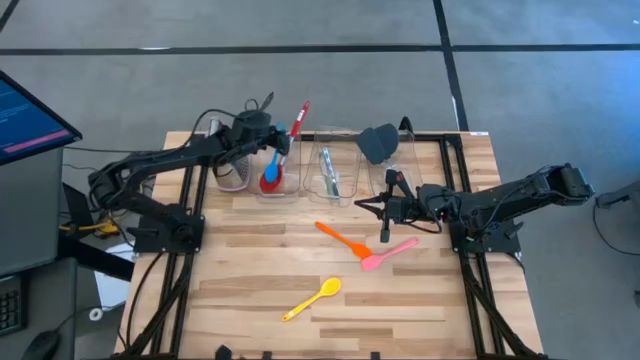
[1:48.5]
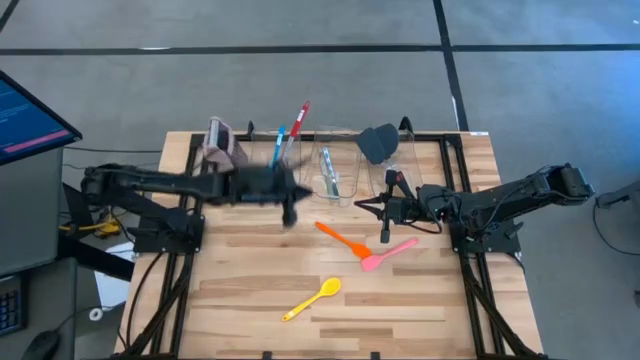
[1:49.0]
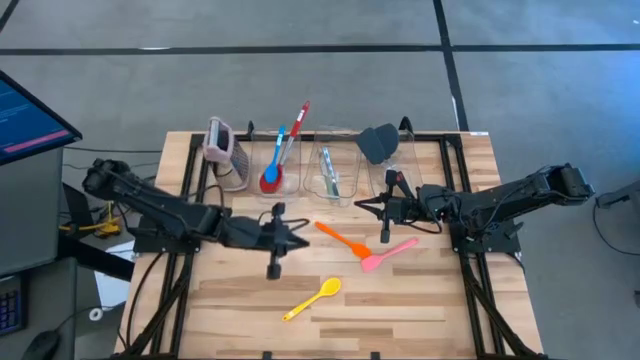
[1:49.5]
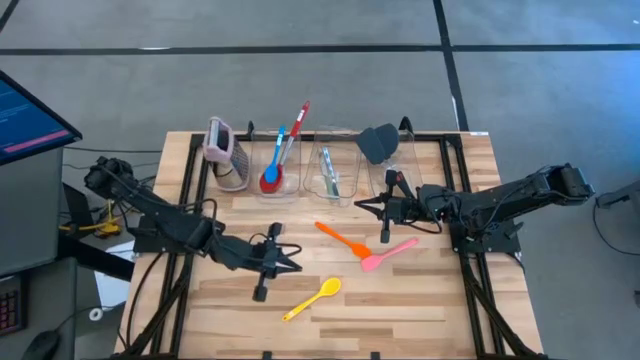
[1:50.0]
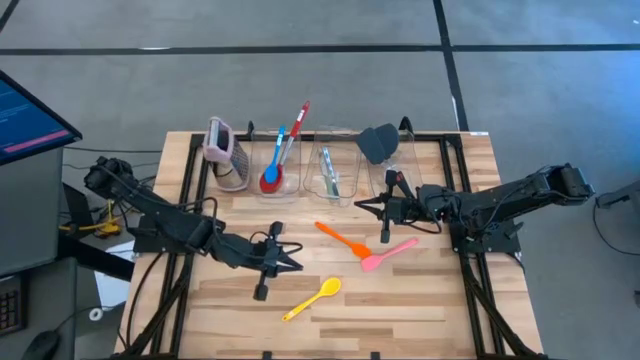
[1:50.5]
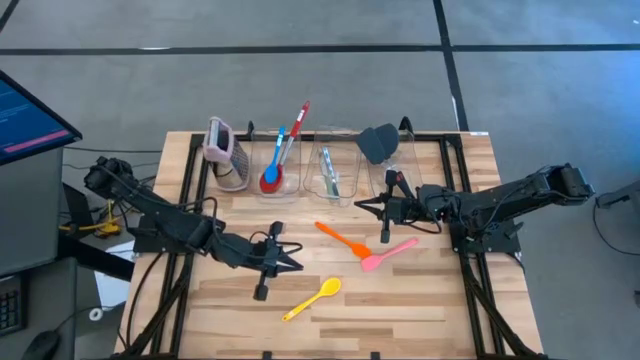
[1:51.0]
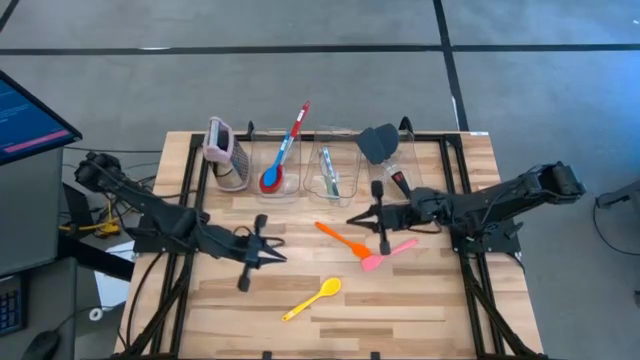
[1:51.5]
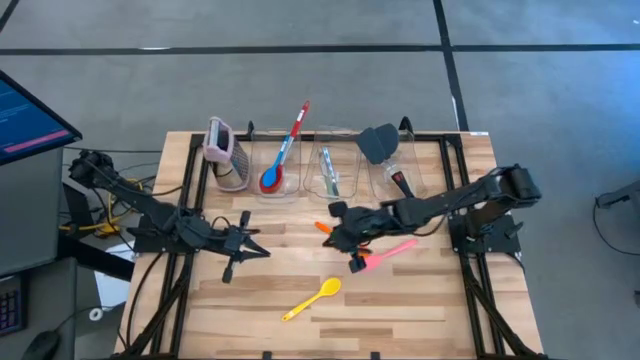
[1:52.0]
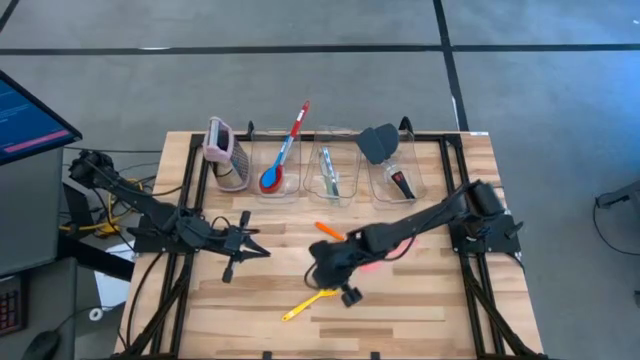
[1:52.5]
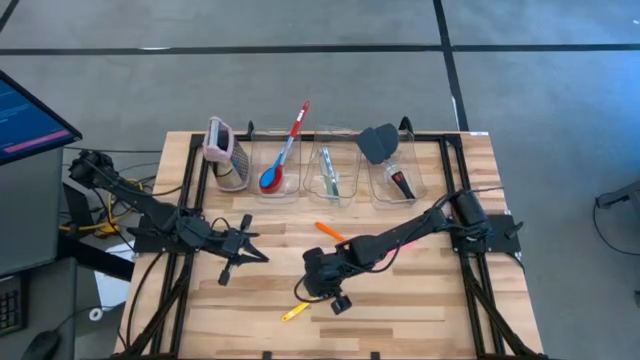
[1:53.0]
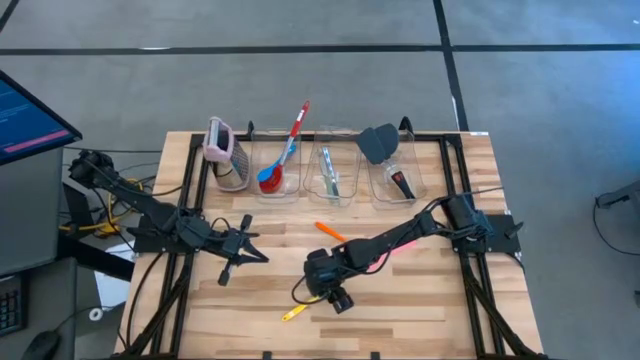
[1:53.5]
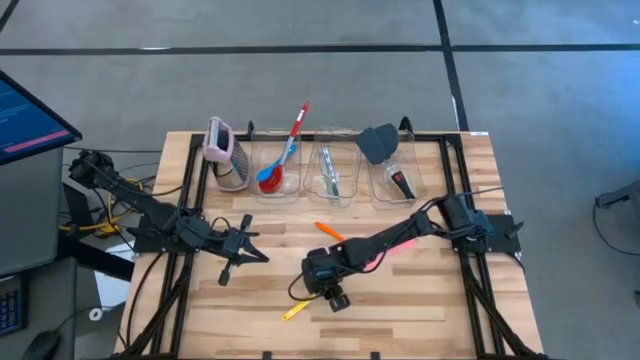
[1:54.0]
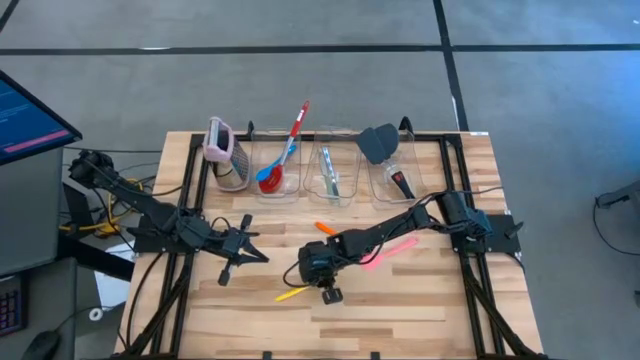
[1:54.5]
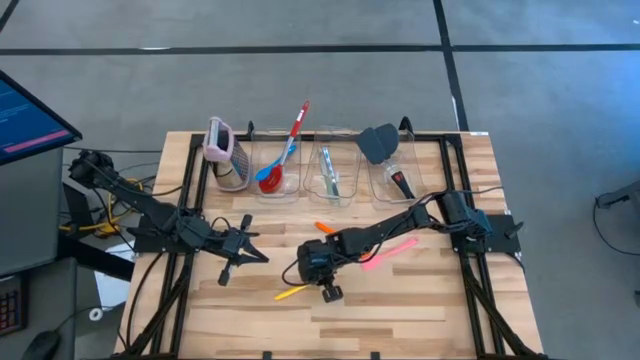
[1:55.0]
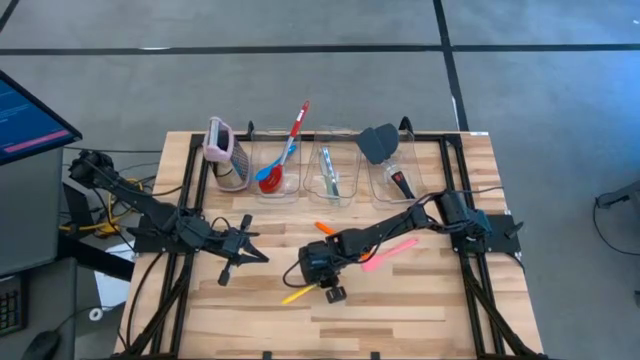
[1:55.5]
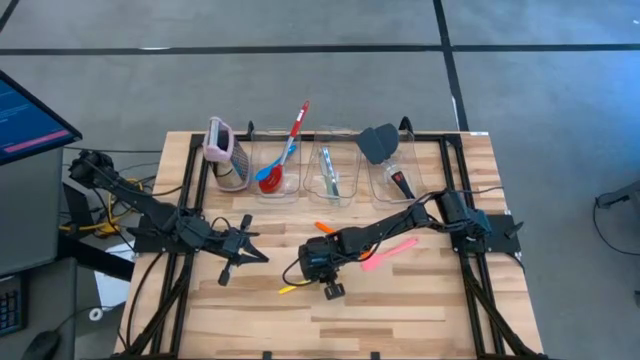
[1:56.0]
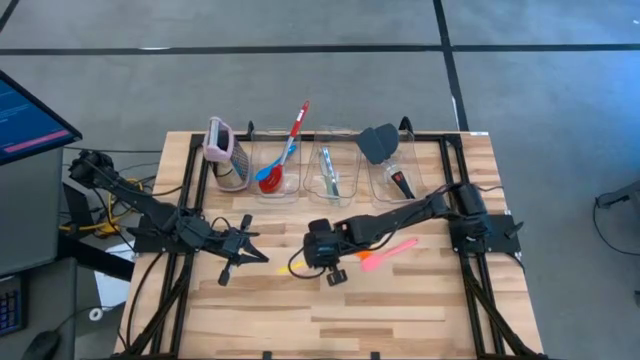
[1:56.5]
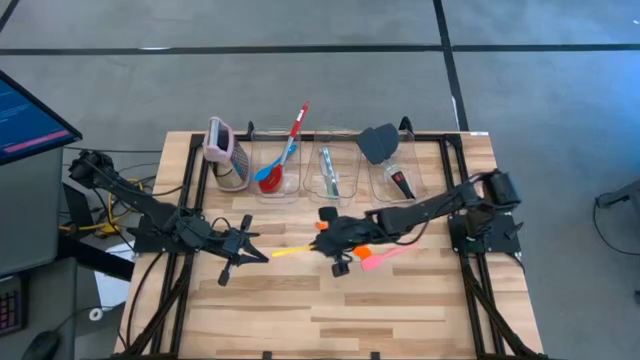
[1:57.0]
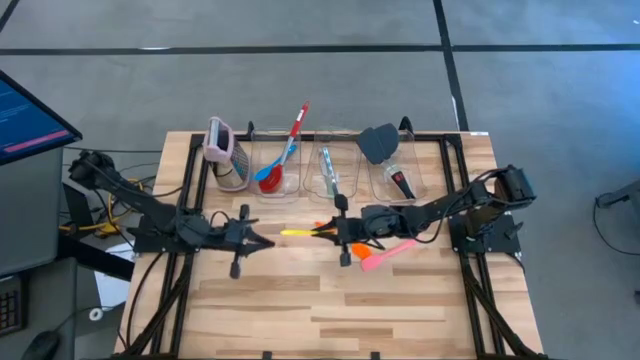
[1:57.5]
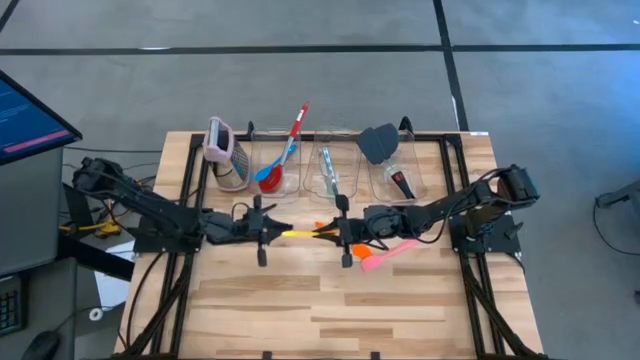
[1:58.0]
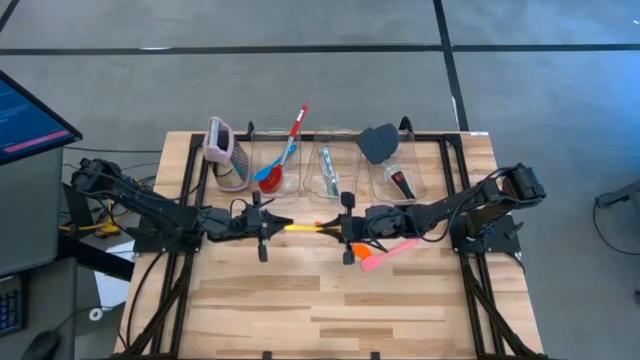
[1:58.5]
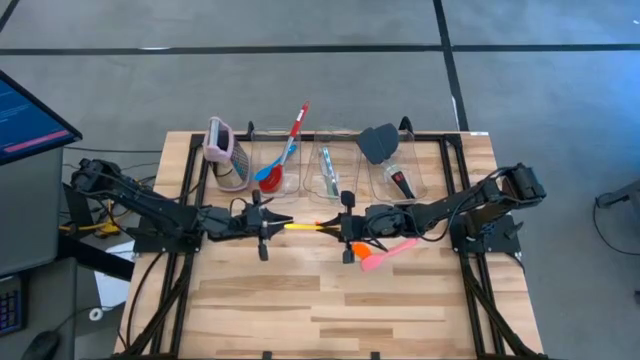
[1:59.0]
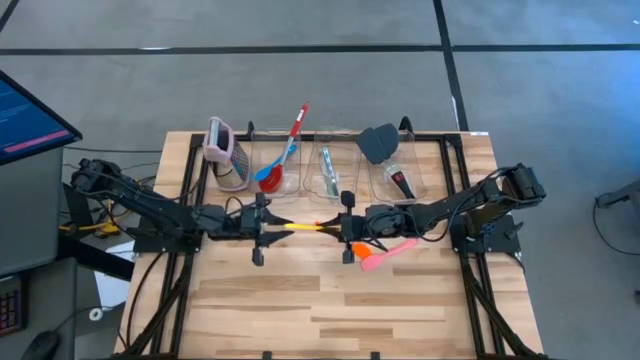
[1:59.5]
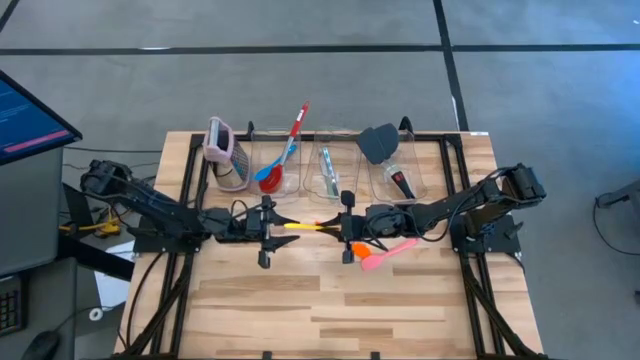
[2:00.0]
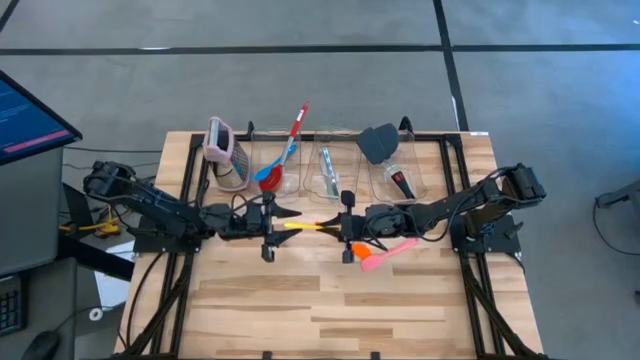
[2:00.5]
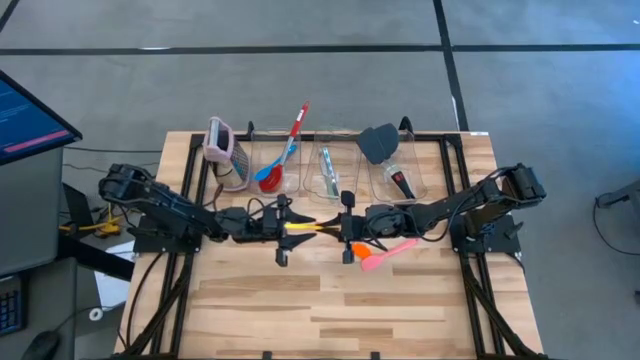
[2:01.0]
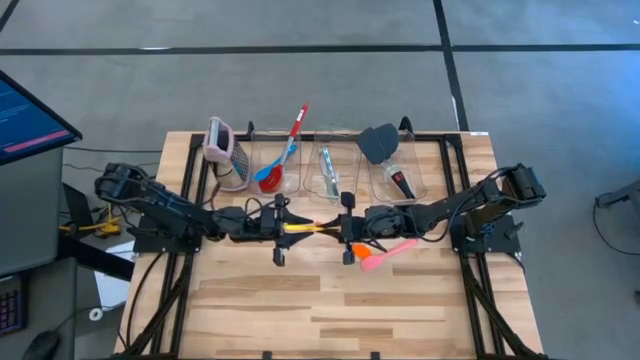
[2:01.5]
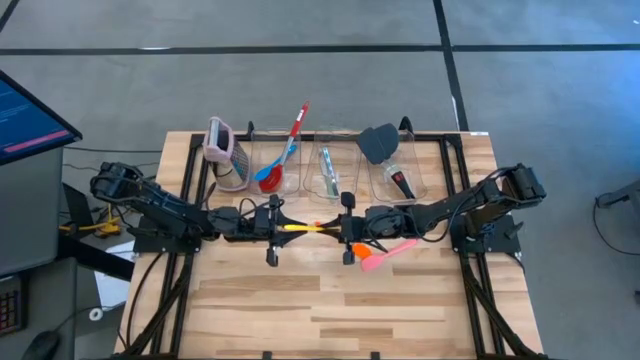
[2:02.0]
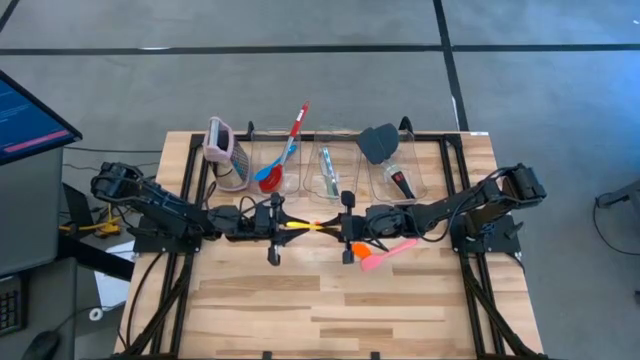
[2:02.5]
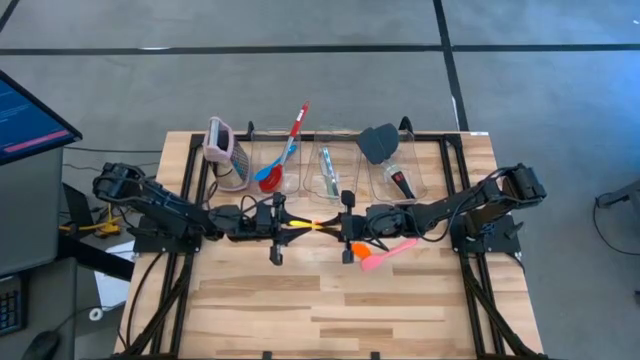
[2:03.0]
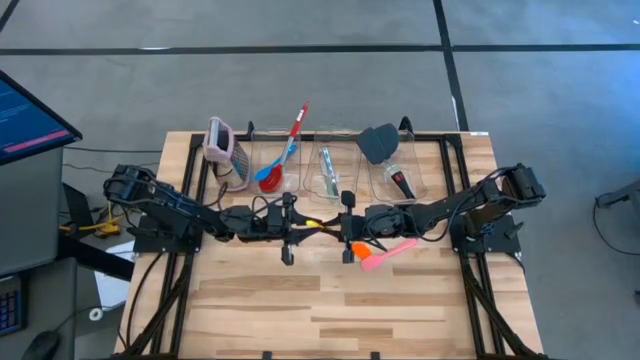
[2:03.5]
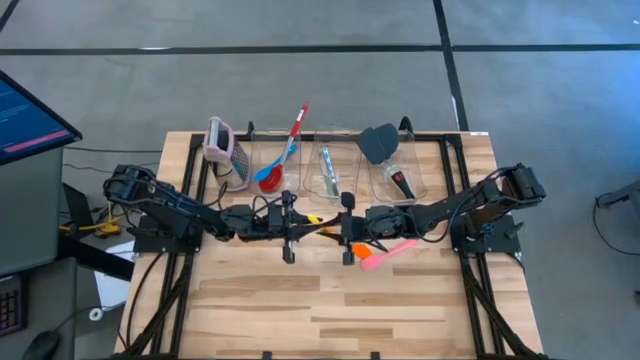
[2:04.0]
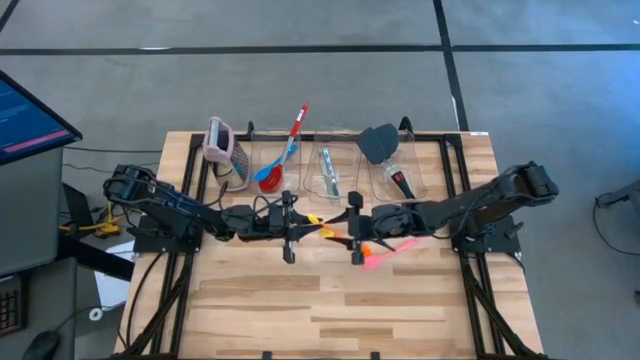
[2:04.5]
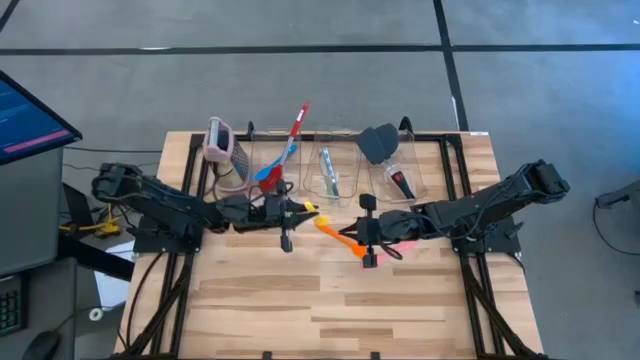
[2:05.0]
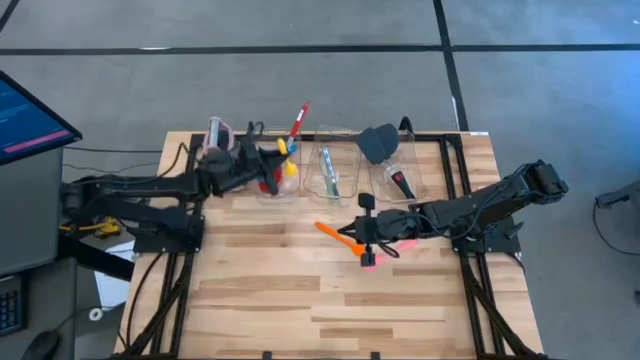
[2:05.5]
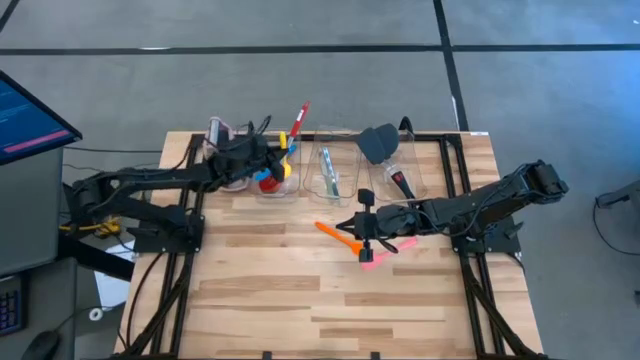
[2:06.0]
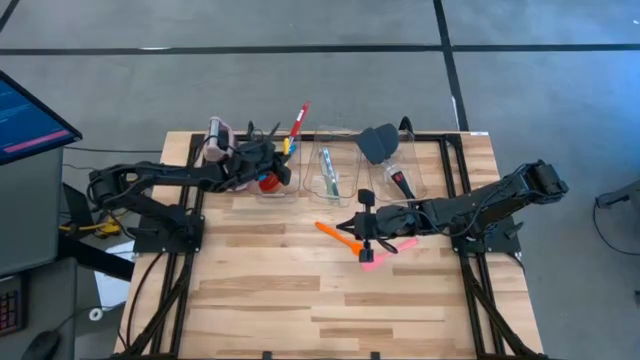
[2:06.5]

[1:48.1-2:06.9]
Task: Pick & Place Kitchen Items
Put the yellow serving spoon into the left transparent bin

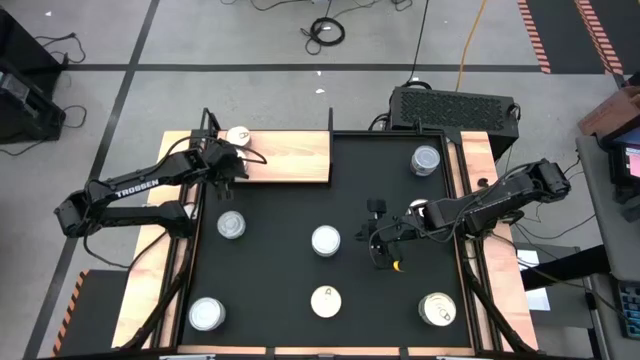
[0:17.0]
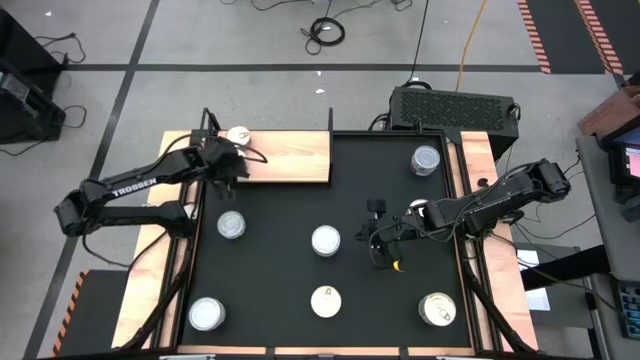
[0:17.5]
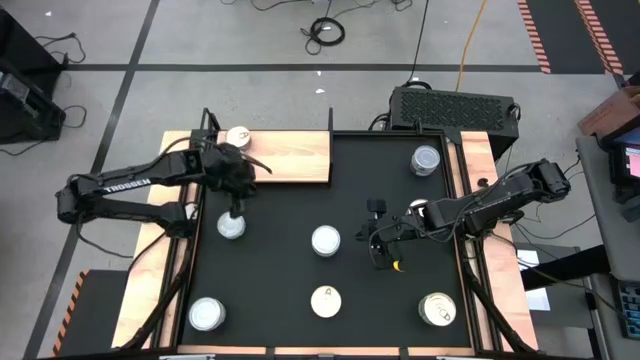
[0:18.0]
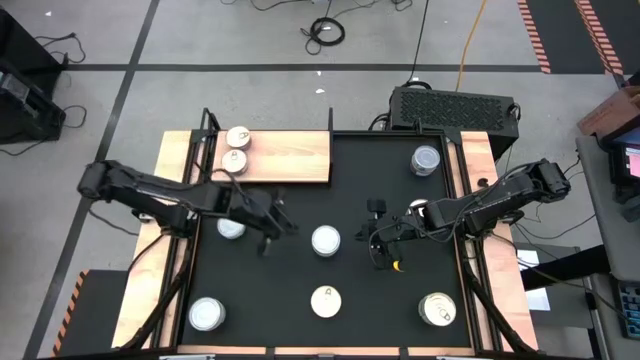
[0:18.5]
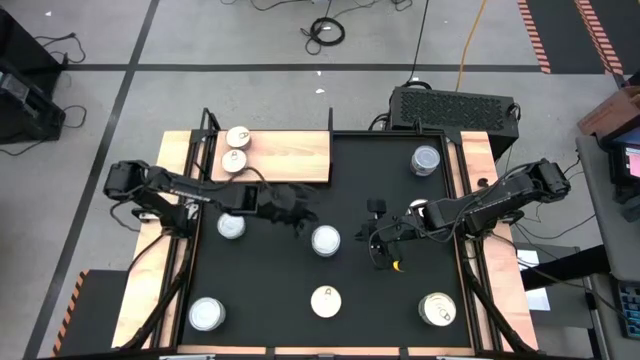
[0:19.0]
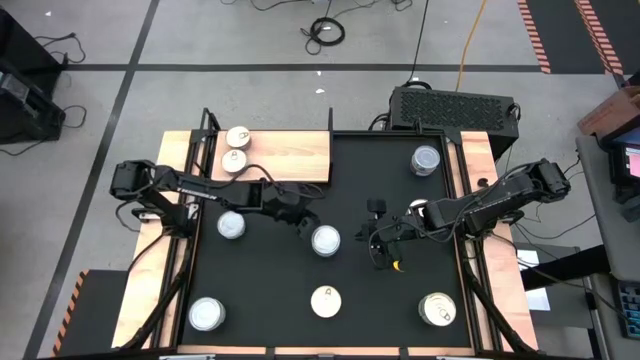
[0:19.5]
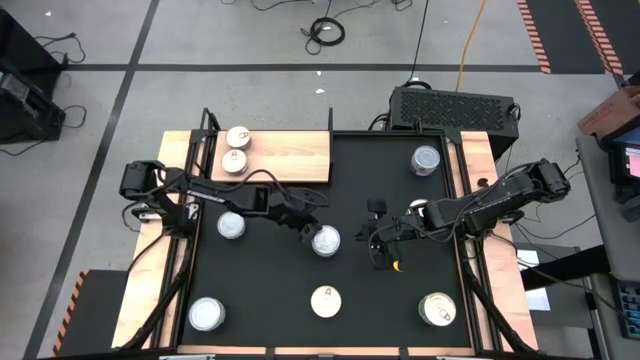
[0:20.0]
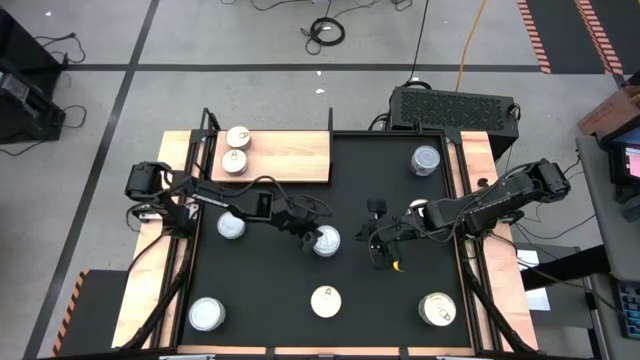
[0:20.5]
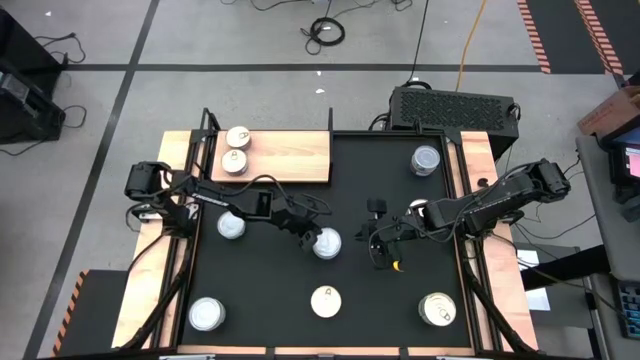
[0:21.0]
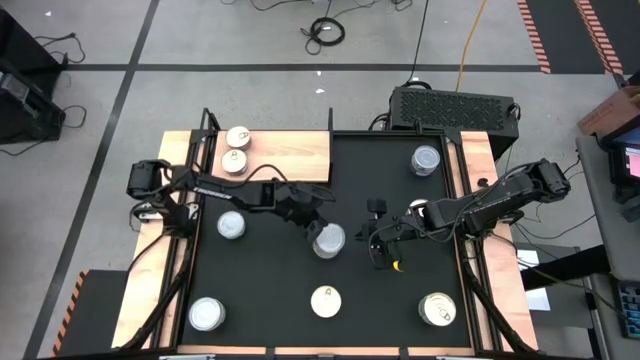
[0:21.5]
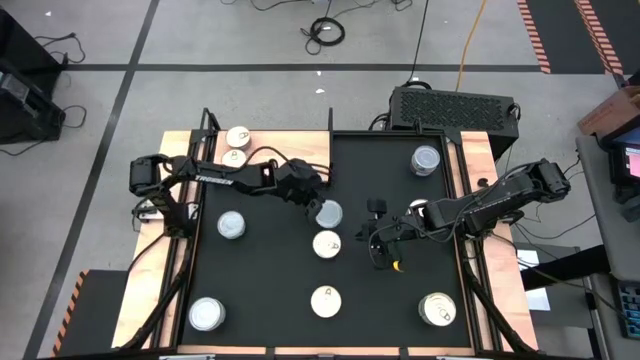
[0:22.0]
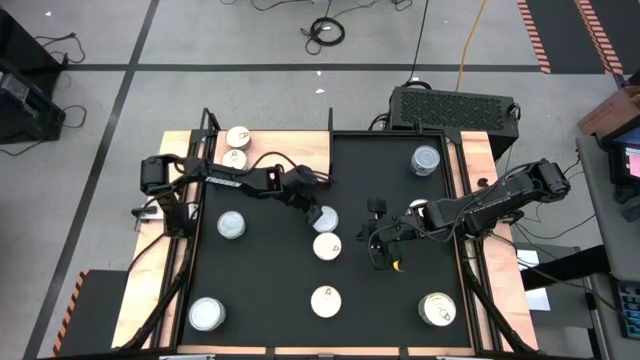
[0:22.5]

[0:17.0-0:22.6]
Task: Stack canned seafood by type on shelf
Remove the green tuna can from the top of the blue tuna can
